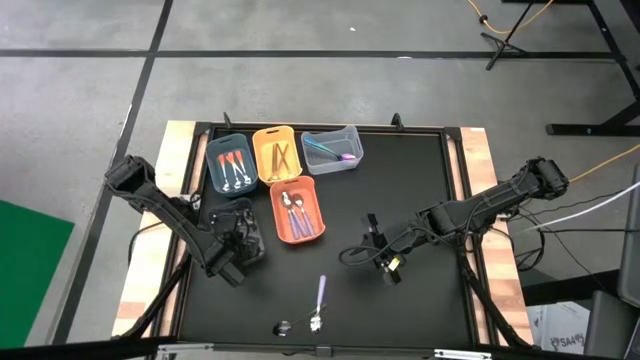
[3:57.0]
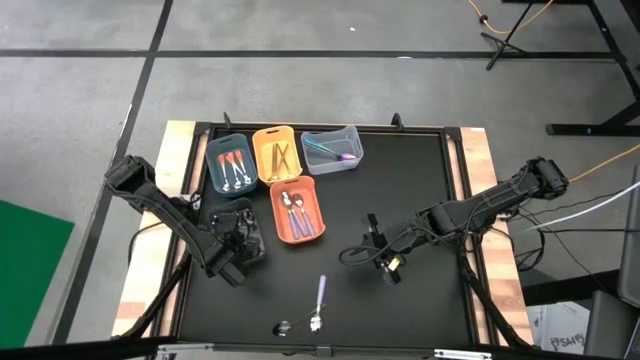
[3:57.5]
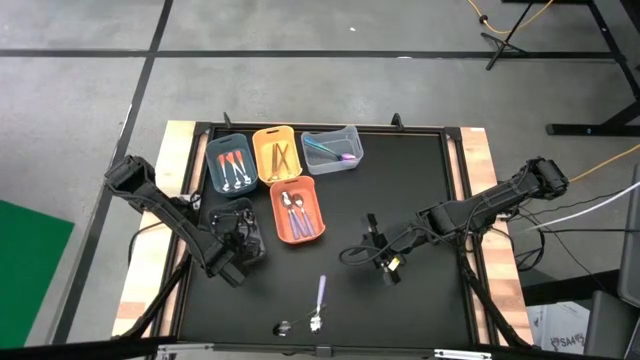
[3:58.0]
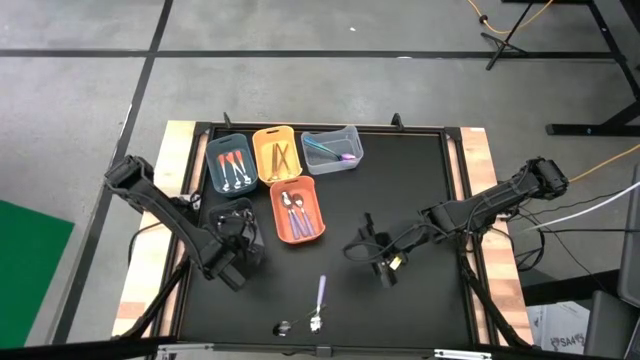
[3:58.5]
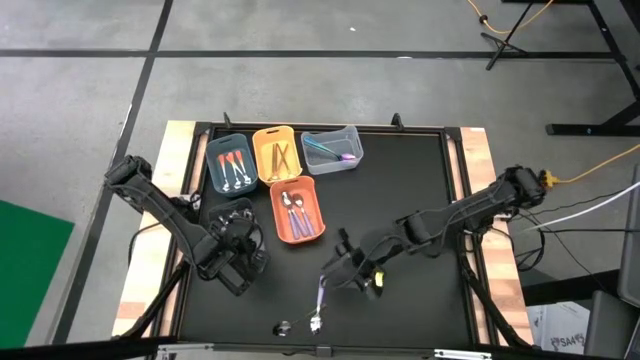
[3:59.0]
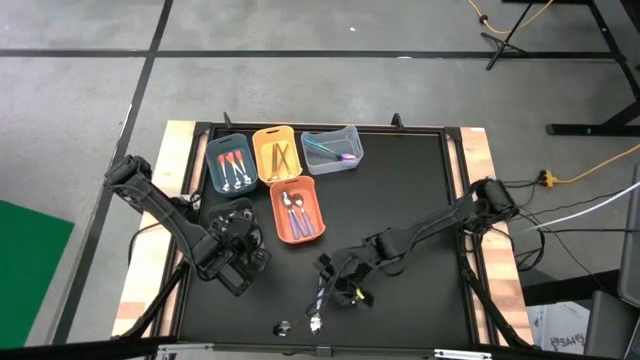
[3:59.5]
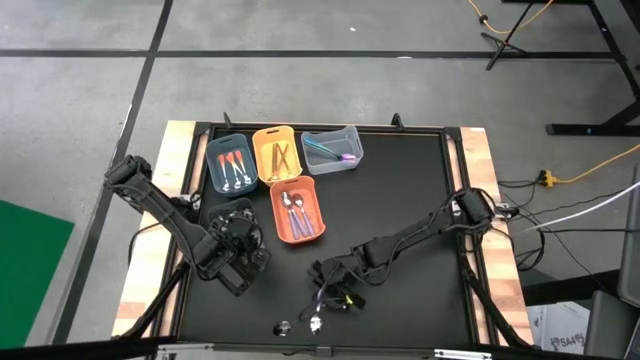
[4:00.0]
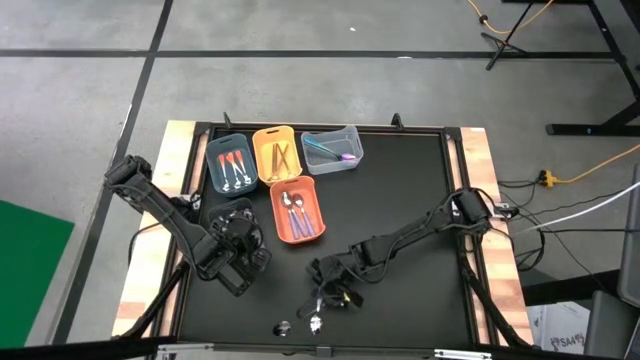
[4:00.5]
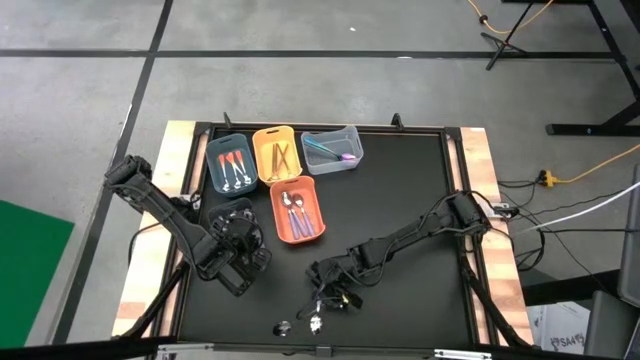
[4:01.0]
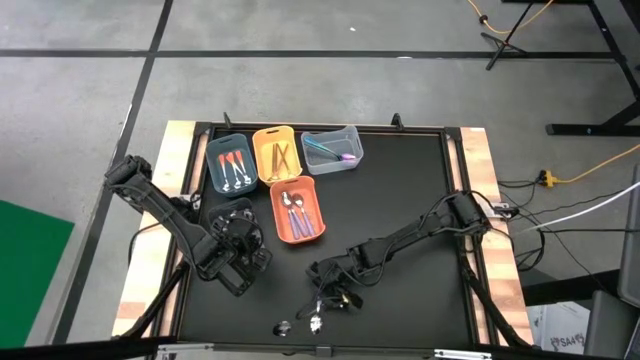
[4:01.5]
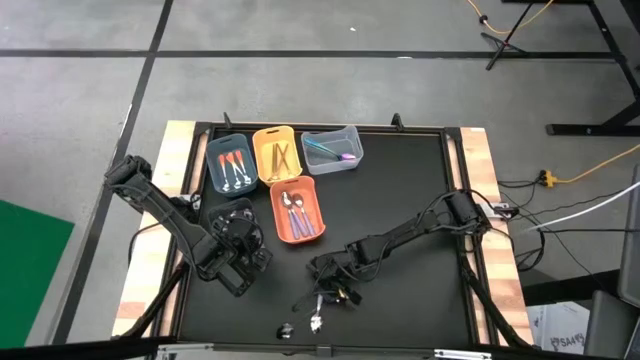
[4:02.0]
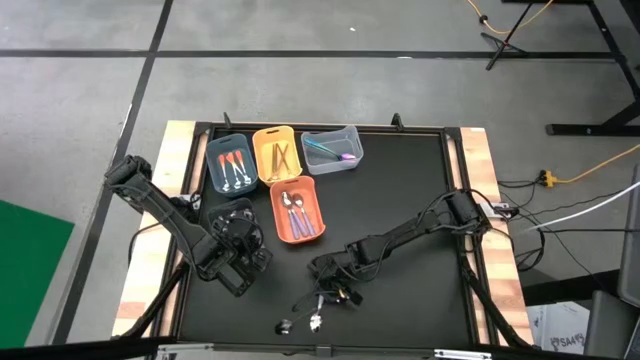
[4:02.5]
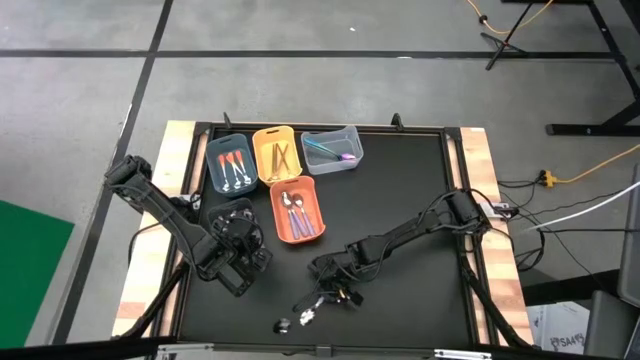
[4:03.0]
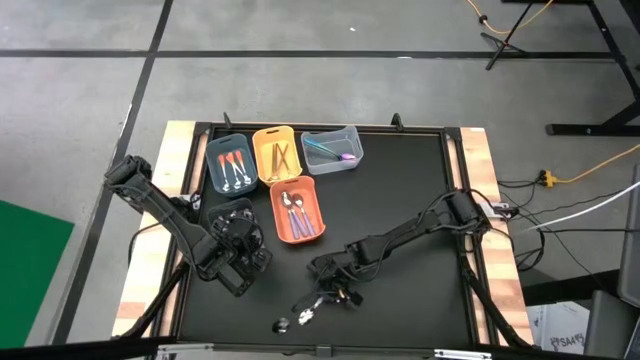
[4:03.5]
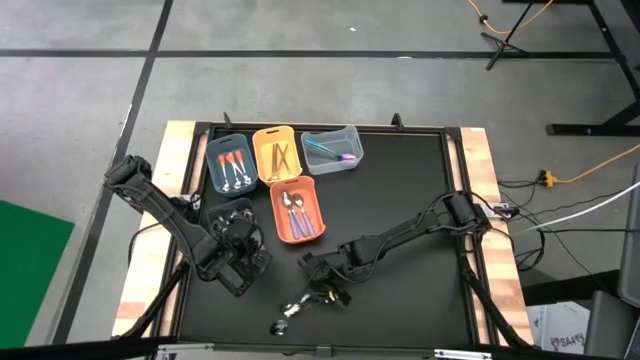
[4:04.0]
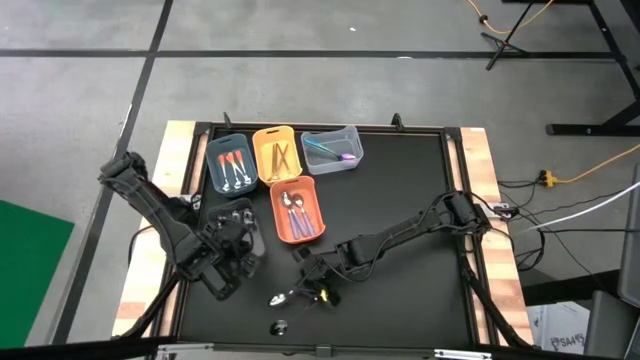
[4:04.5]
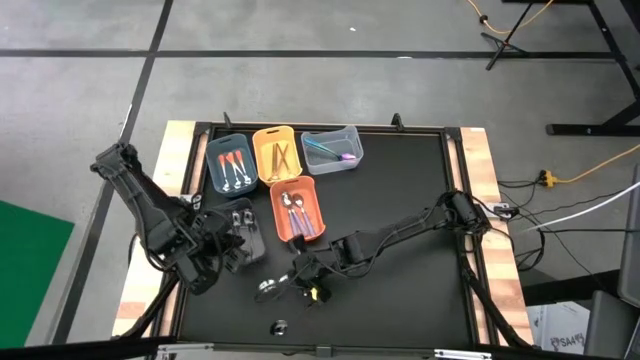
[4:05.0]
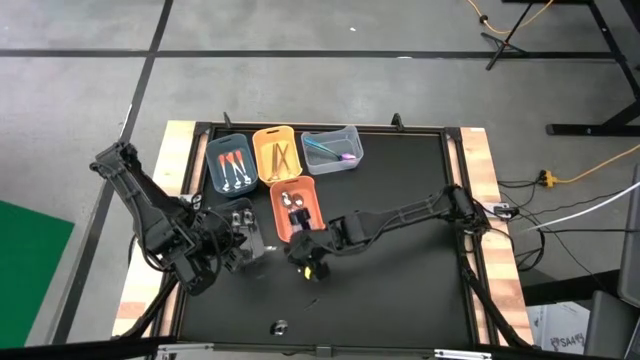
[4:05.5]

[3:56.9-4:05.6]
Task: Sort silverware by color (type)
Put the purple spoon into the orange bin

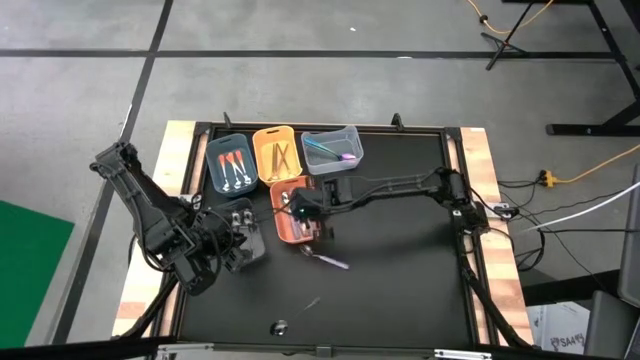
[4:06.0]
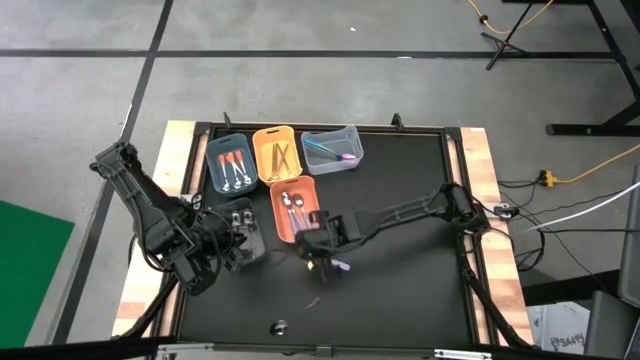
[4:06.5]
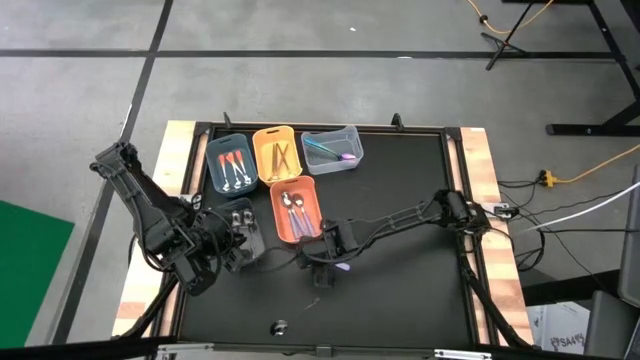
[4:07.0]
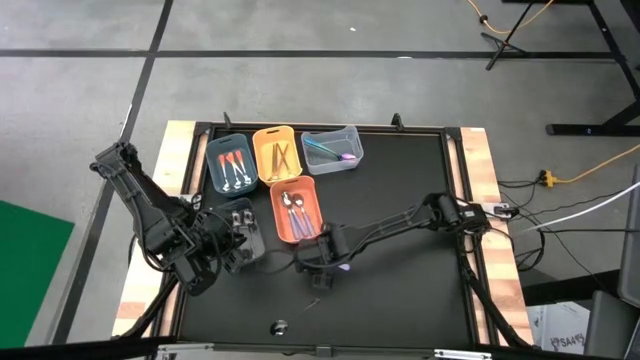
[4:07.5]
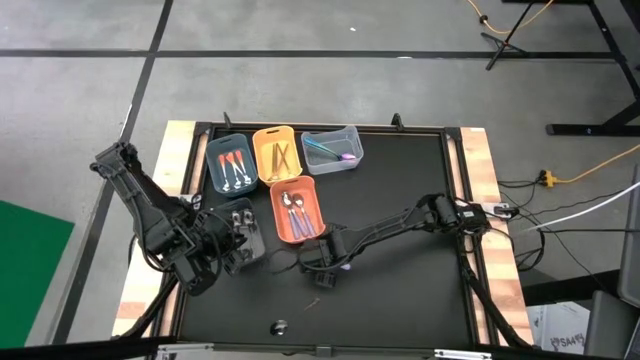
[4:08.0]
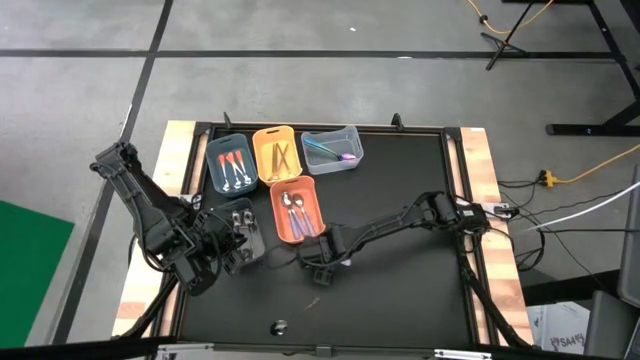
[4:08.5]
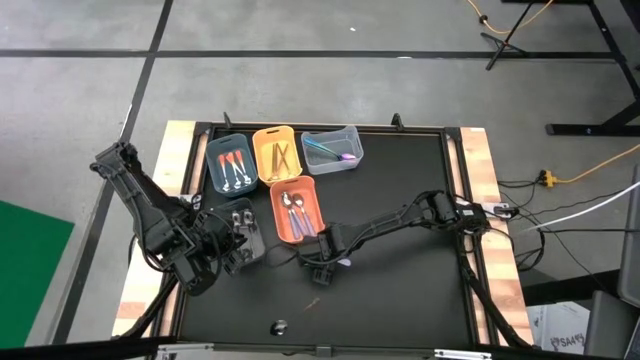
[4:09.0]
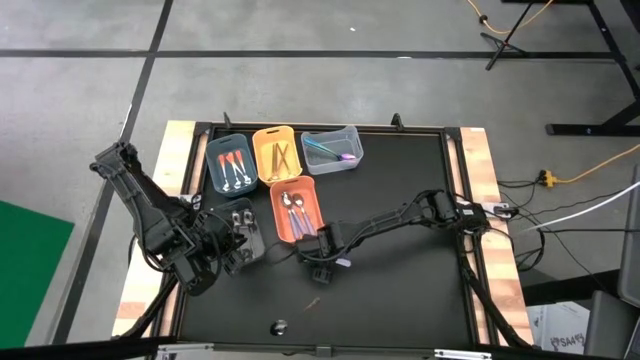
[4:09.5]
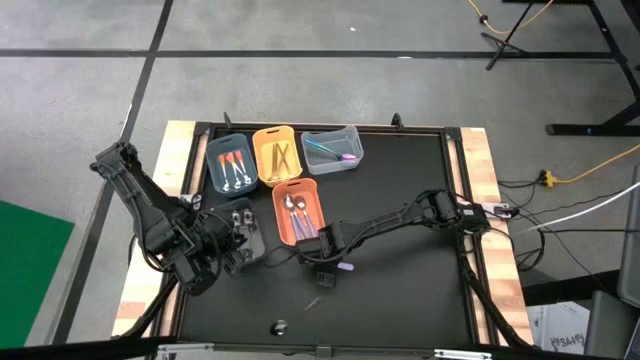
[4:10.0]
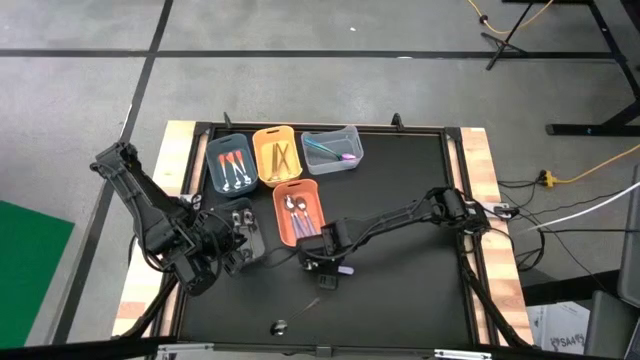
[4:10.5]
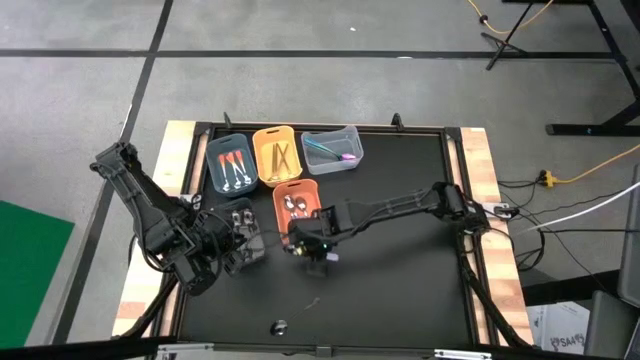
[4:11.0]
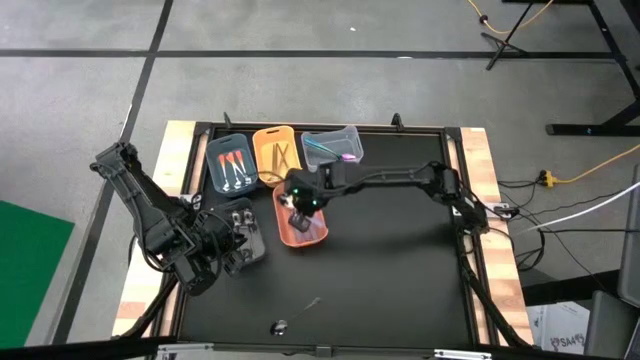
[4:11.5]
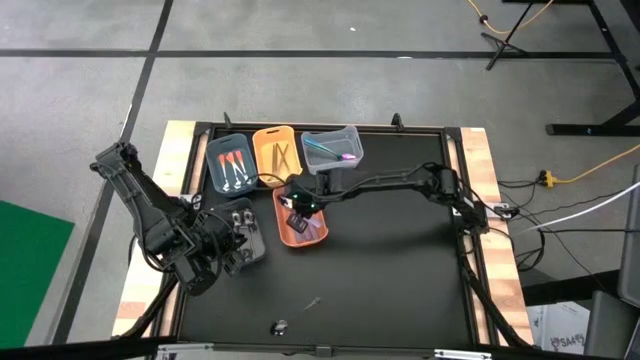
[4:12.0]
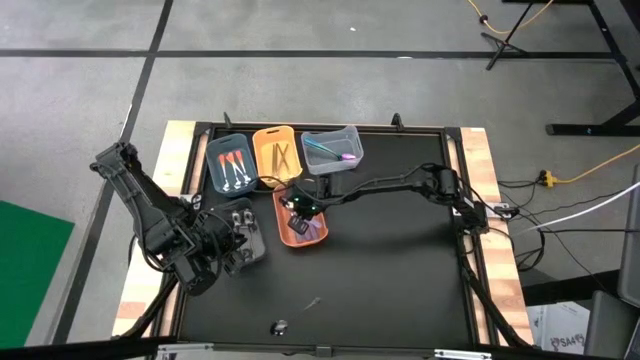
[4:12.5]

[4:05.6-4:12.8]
Put the purple spoon into the orange bin

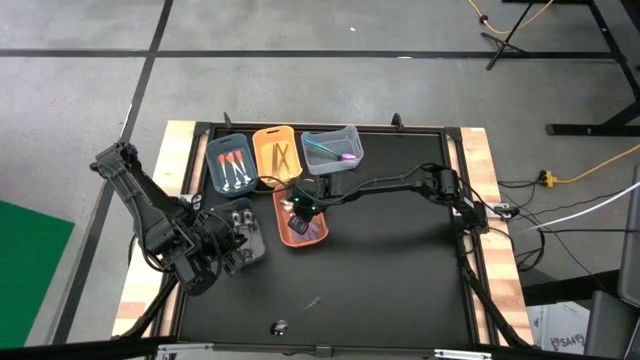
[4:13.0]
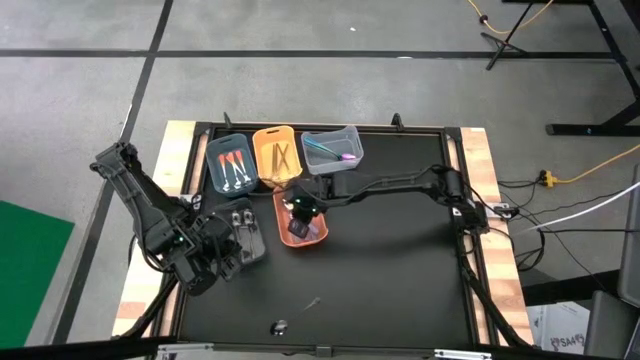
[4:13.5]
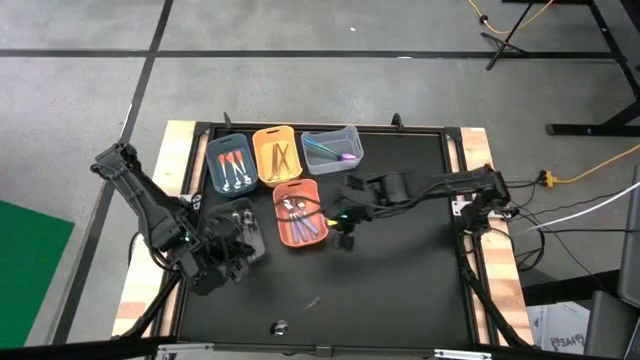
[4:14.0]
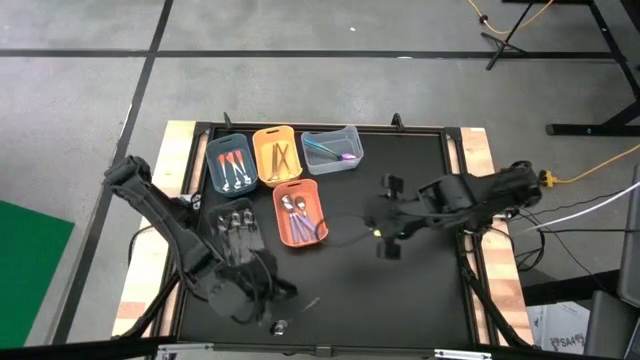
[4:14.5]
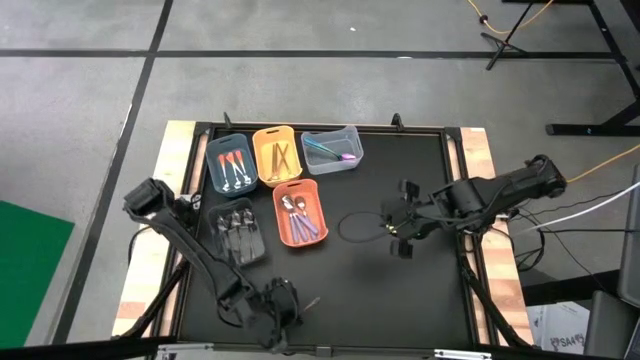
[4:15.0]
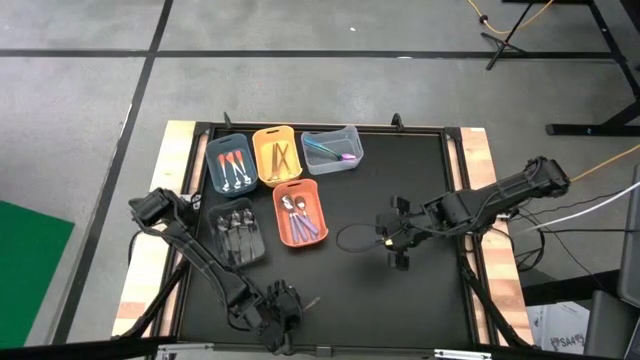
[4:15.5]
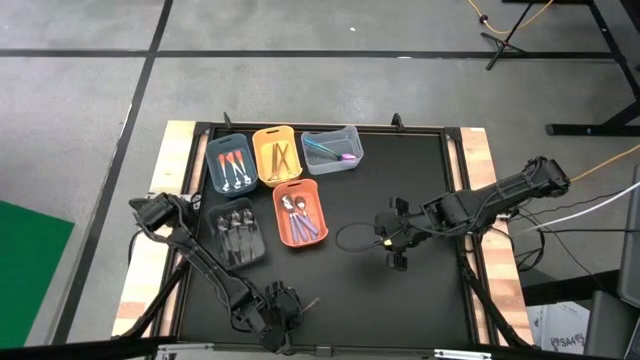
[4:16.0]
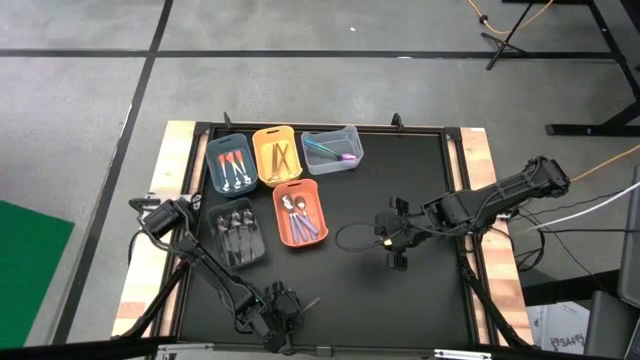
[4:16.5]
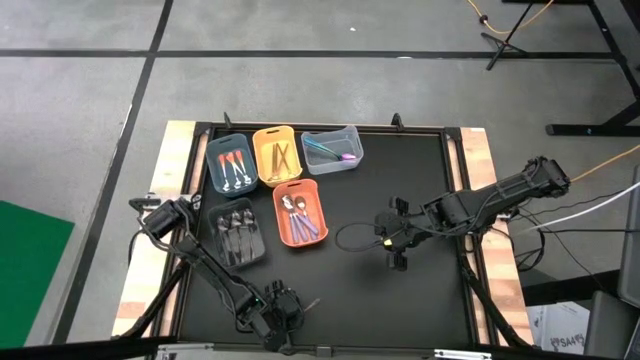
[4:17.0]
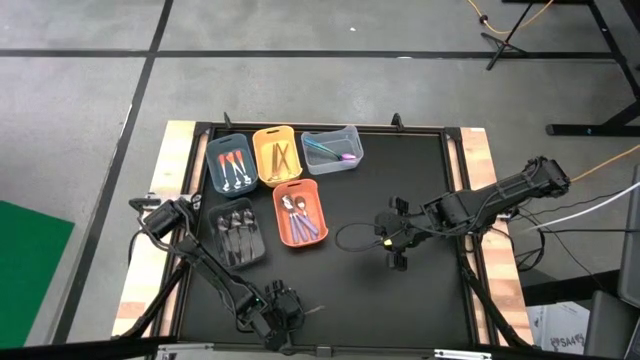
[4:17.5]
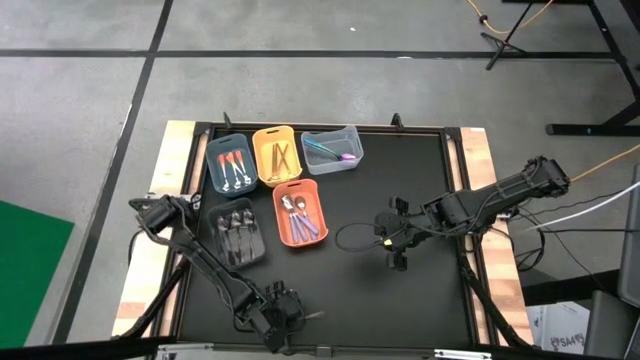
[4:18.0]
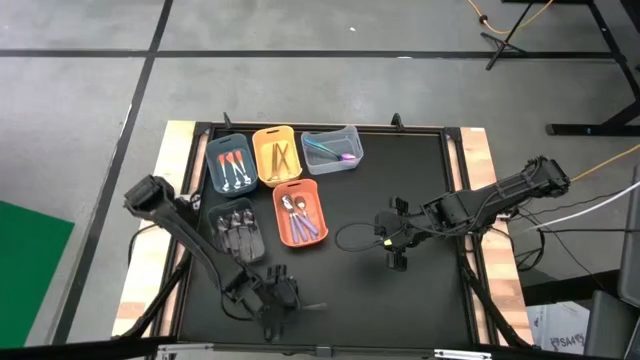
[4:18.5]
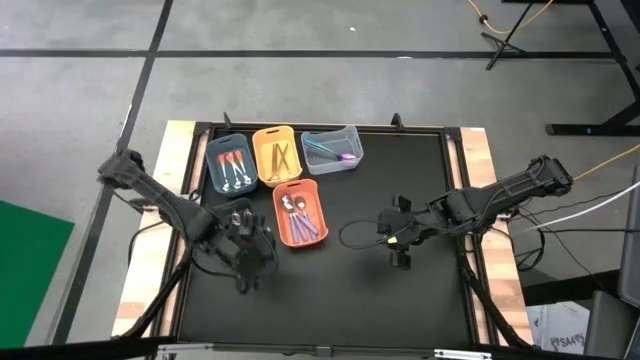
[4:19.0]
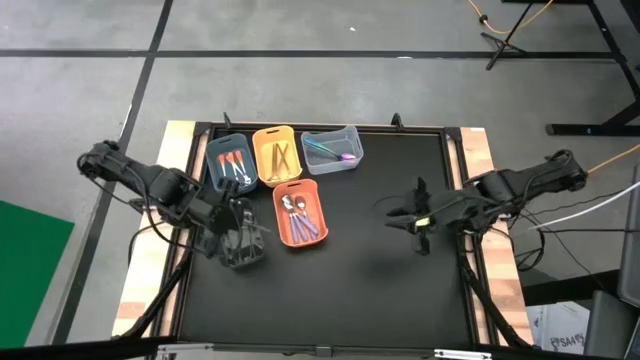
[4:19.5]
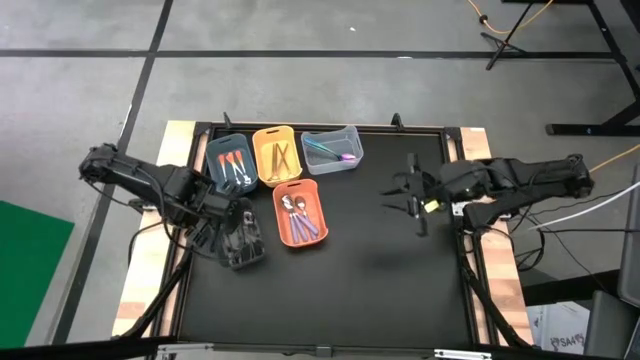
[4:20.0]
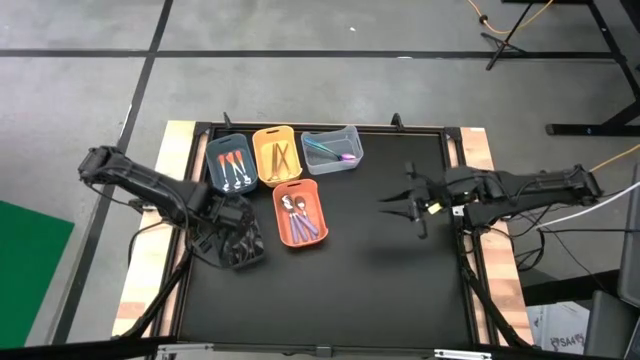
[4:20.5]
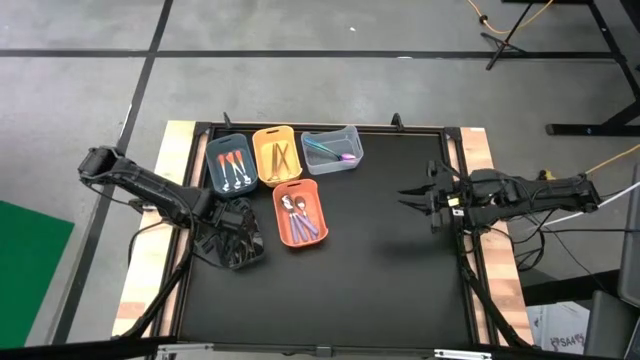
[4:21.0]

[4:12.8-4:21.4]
Put the black spoon into the black bin
